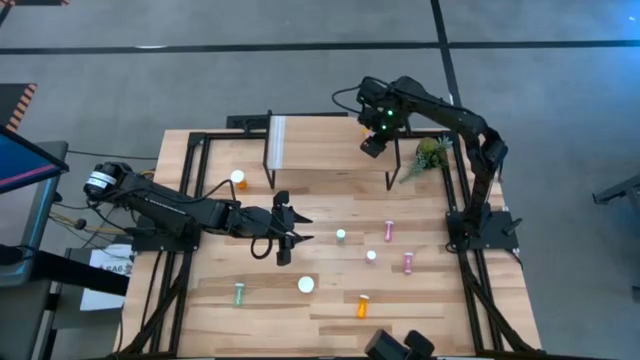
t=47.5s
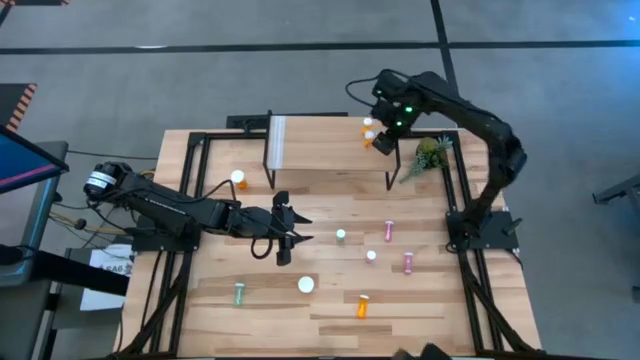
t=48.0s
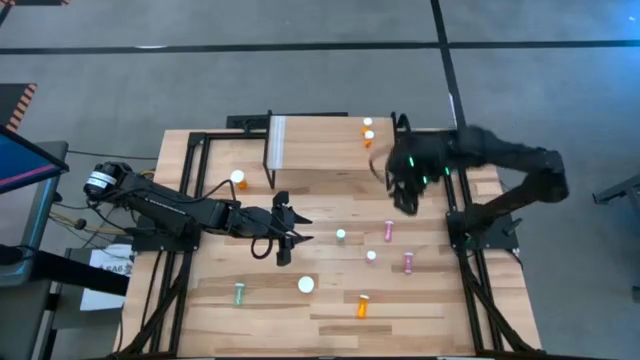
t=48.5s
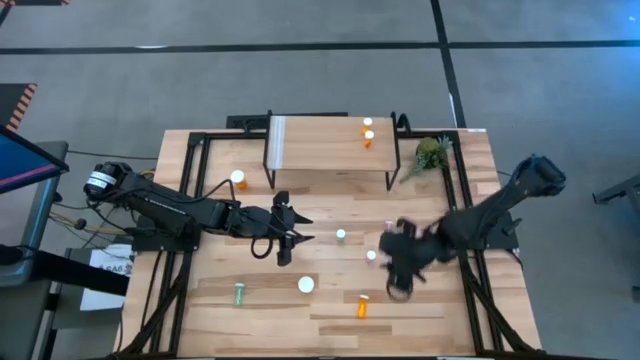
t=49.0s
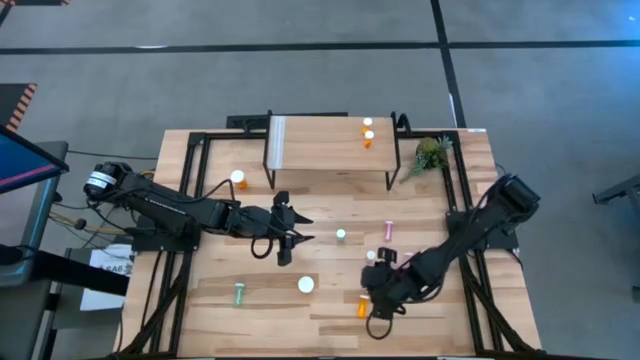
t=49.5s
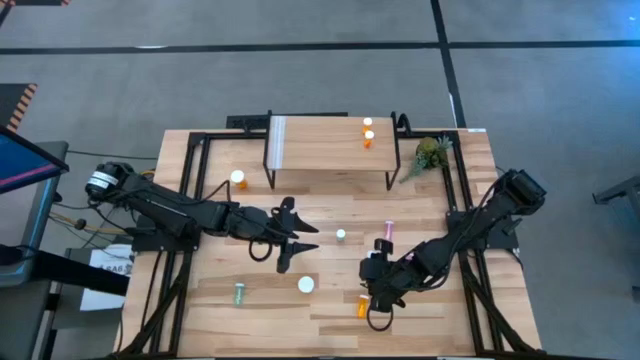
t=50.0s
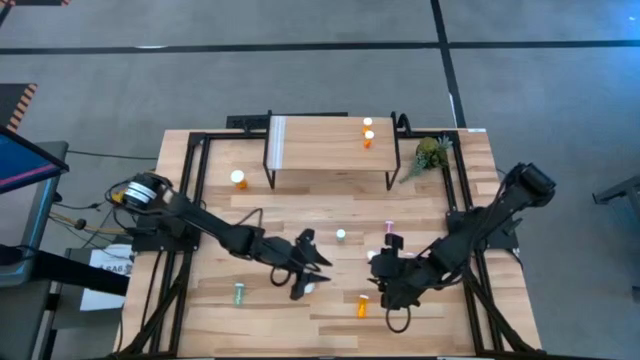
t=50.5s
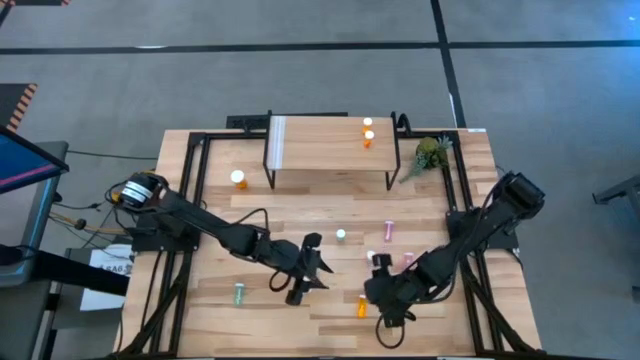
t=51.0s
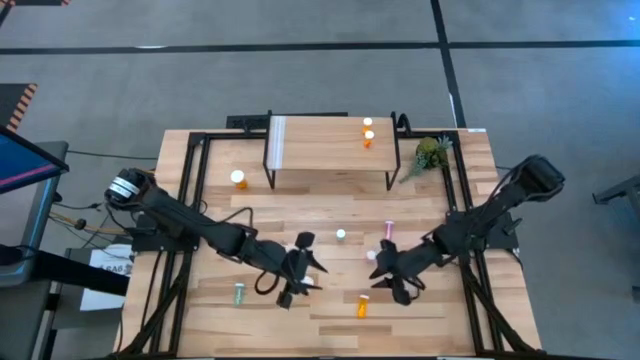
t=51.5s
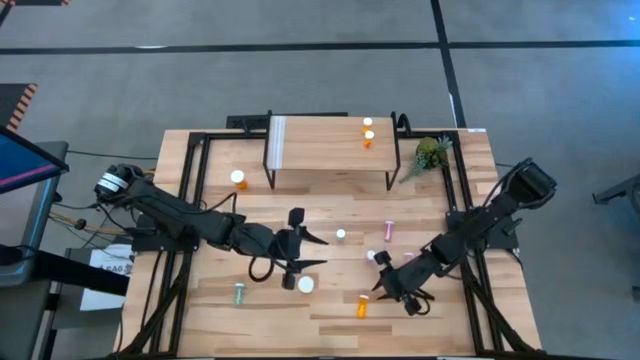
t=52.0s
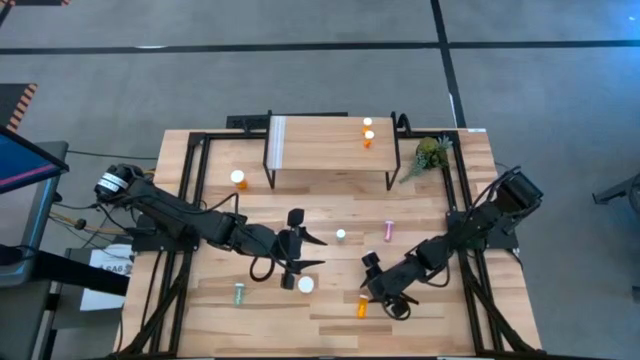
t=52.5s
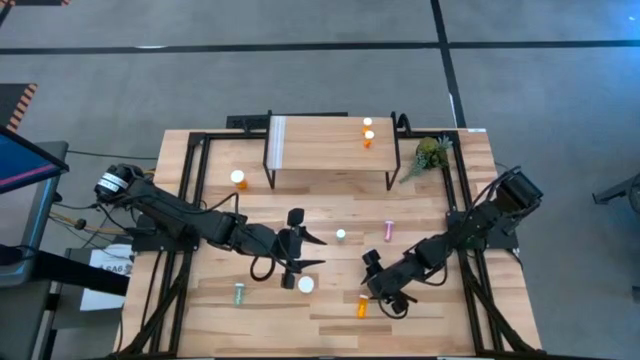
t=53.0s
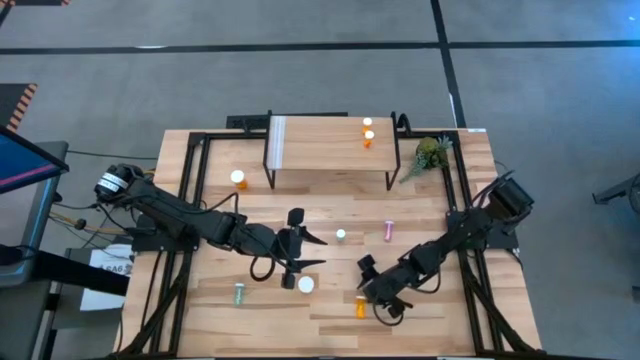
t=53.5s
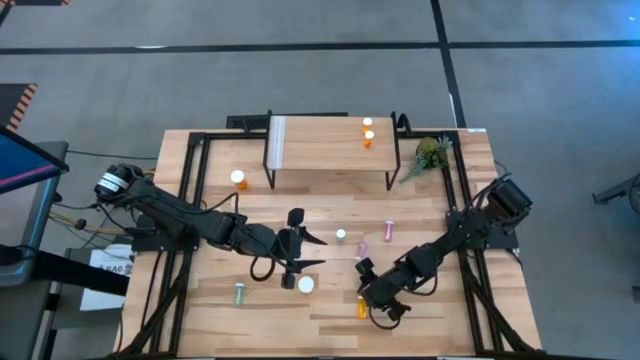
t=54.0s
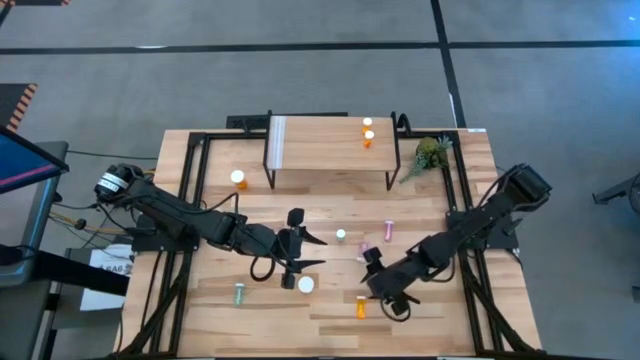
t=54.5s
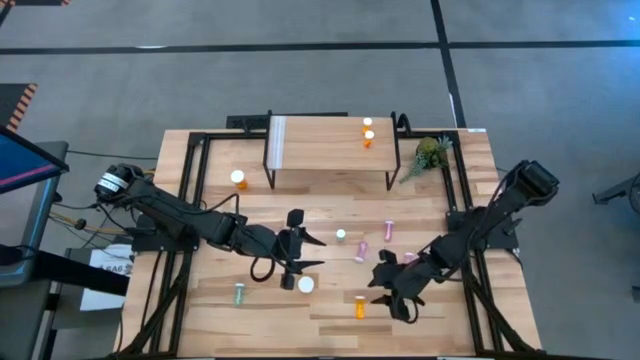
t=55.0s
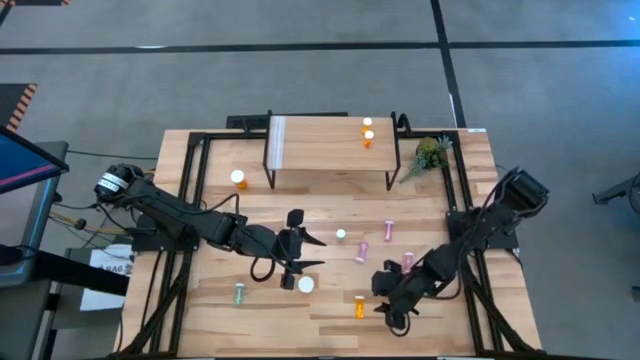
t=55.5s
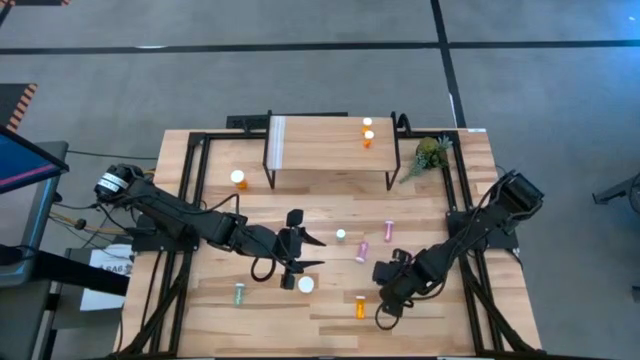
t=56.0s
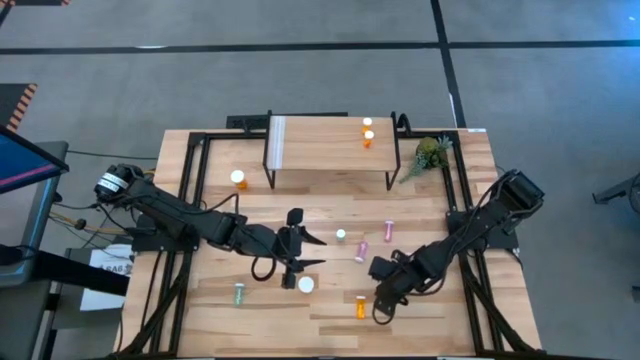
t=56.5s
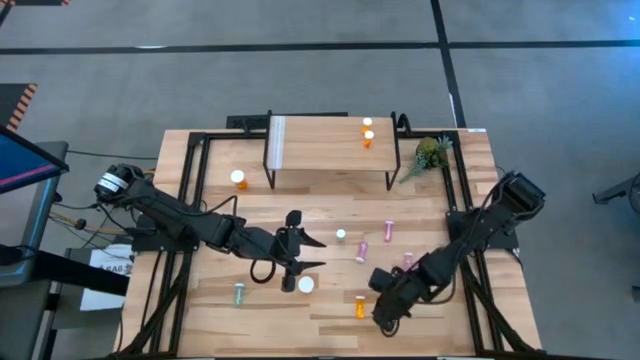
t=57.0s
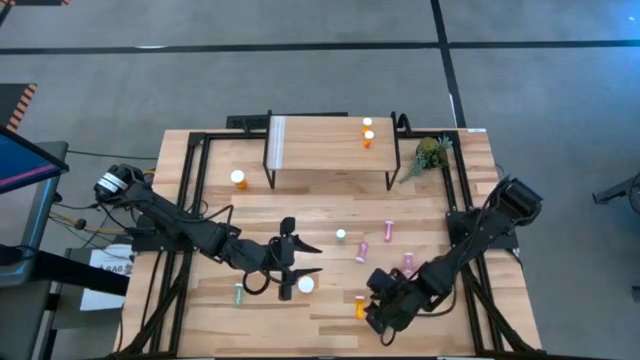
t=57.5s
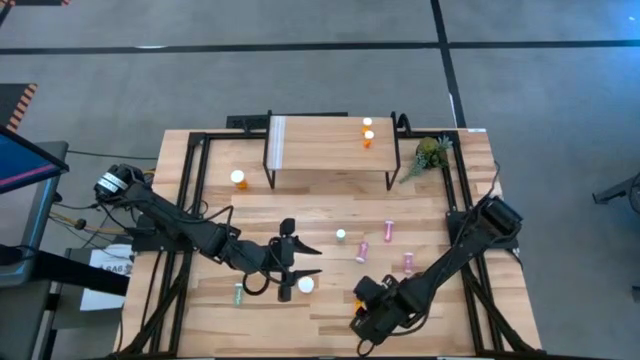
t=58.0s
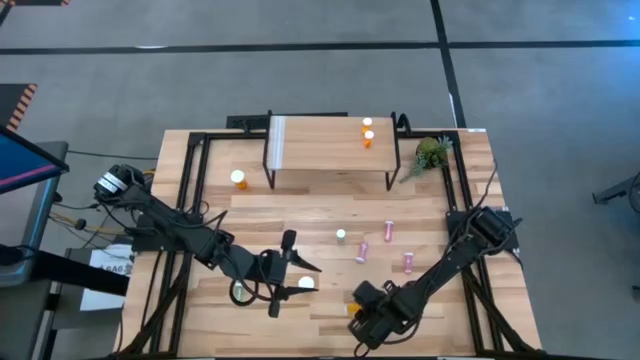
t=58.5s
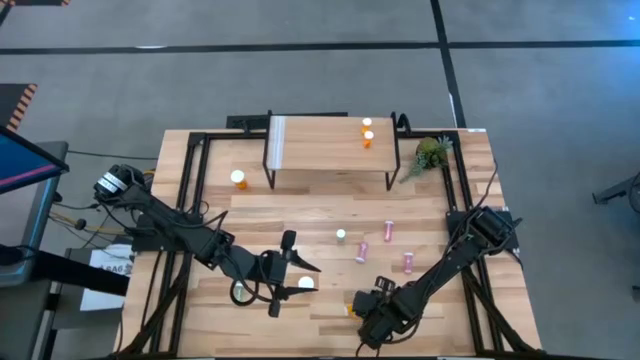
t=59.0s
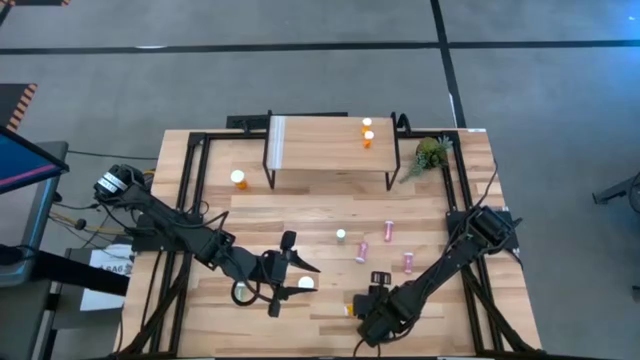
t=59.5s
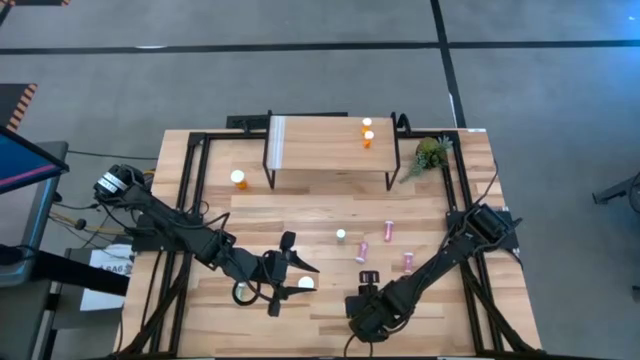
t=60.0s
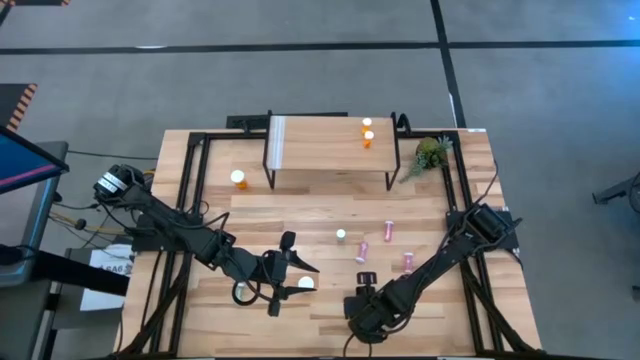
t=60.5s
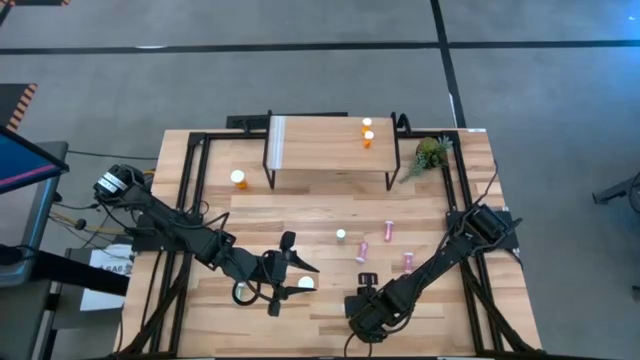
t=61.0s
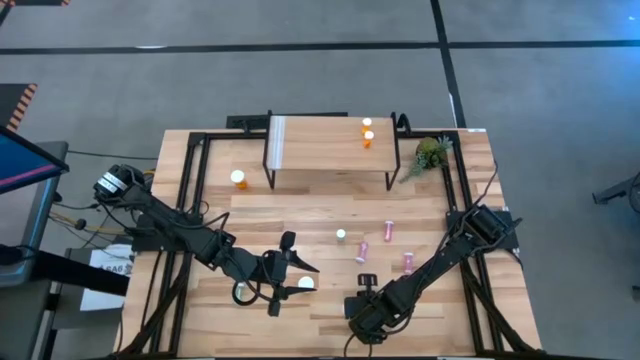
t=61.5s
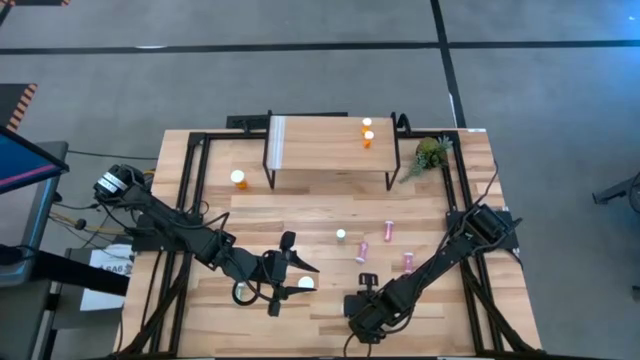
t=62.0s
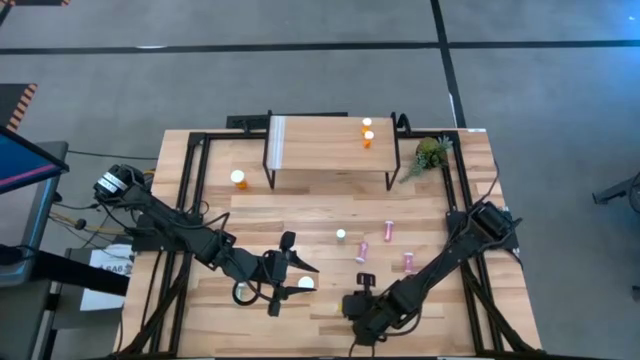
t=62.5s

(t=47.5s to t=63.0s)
Task: Pick and place medicine bottles onto shelf by color
Put the small orange pill bottle on the shelf aligned with the small orange pill bottles

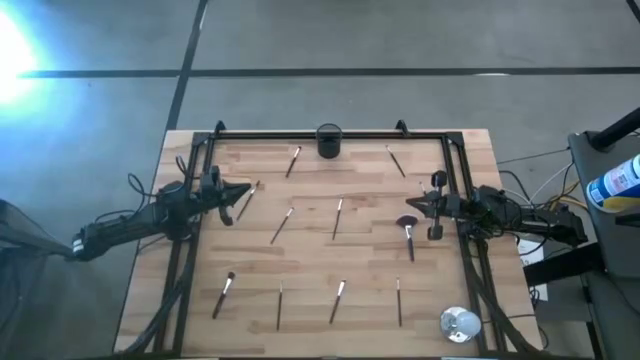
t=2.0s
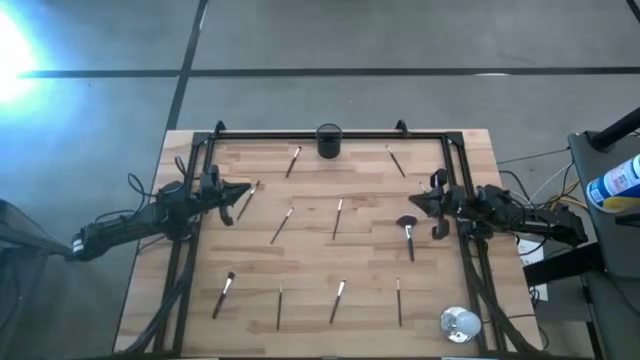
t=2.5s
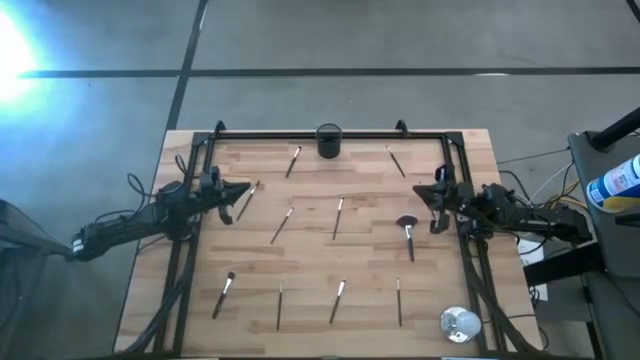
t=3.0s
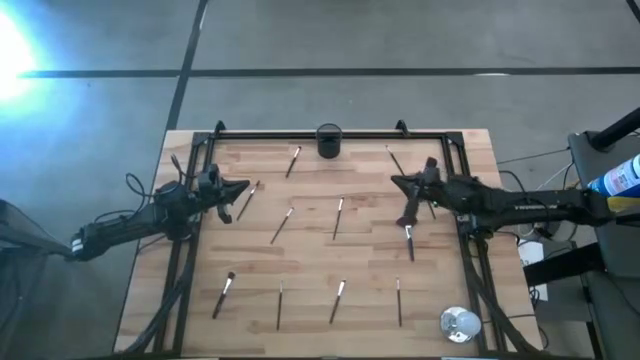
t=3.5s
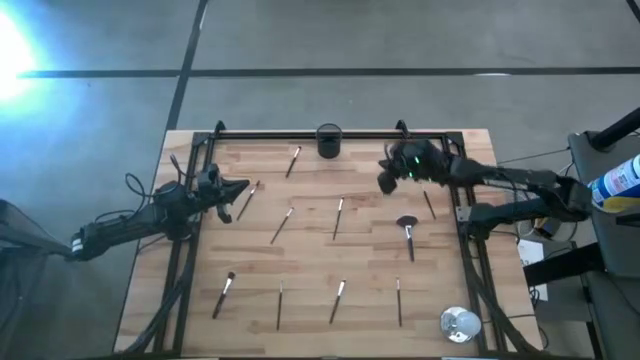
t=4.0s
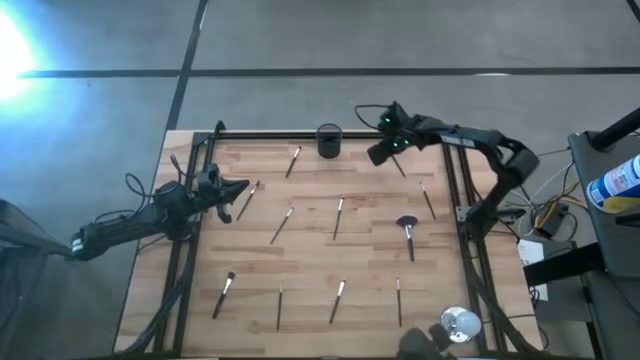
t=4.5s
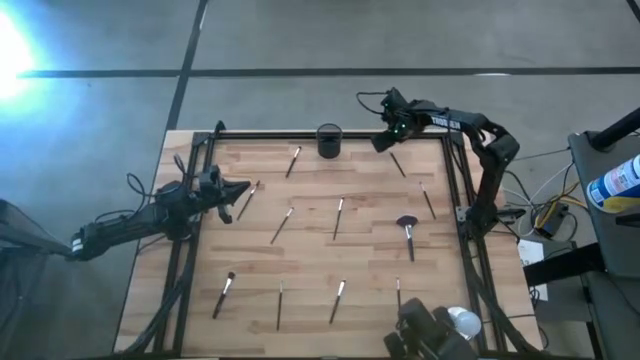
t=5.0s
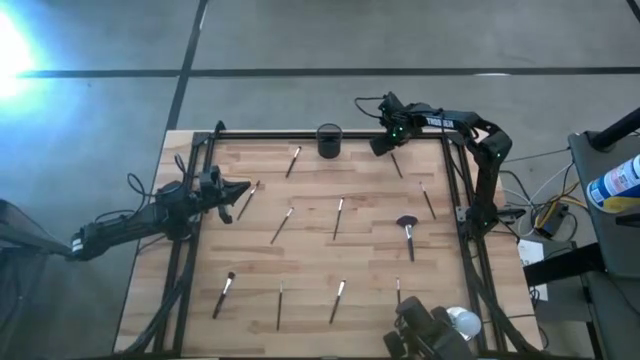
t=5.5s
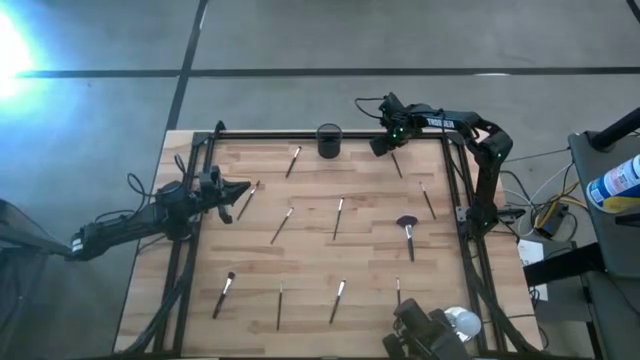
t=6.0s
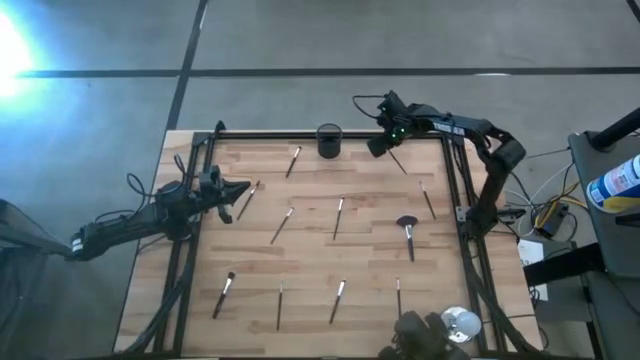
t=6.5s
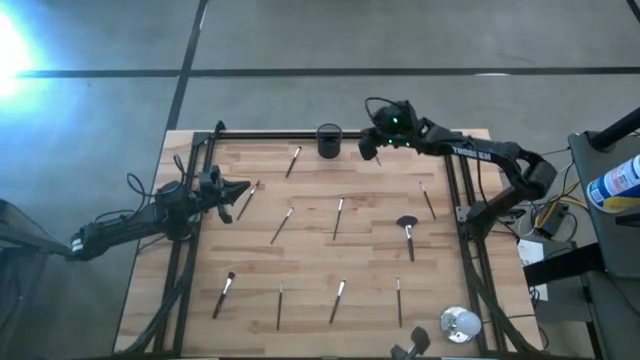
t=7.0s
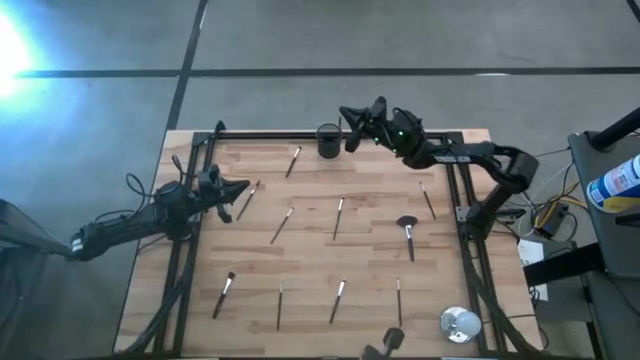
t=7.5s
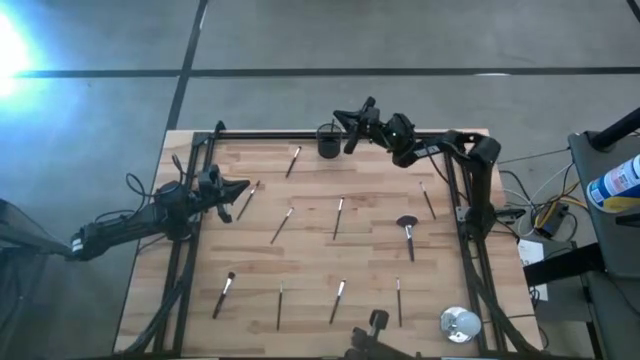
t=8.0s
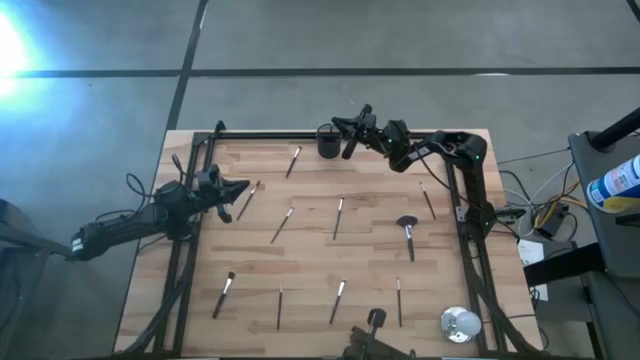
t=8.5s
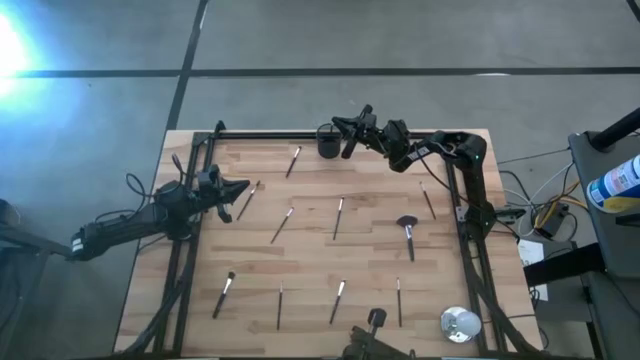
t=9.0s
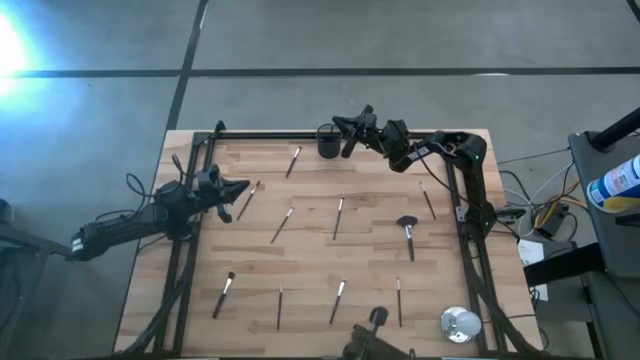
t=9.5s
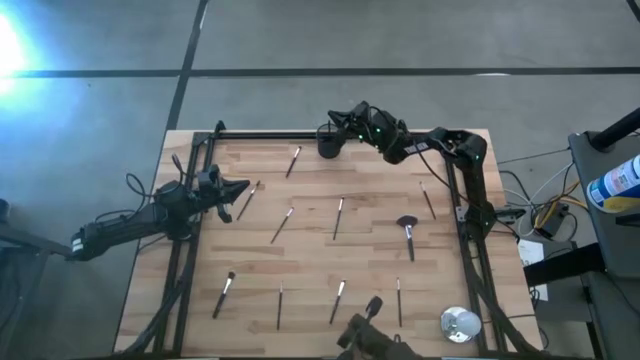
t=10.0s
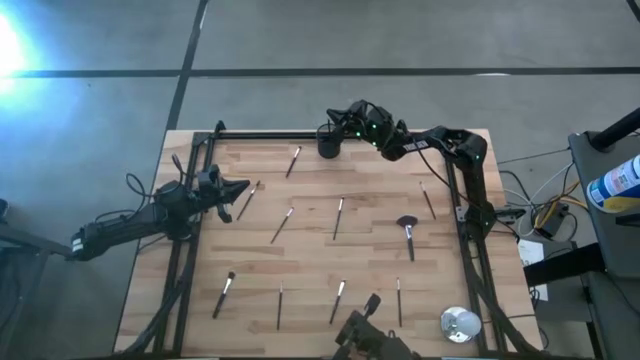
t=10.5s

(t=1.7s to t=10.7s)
Task: Put items in baskets/containers
Put the black eyeshadow brush into the black pen holder
